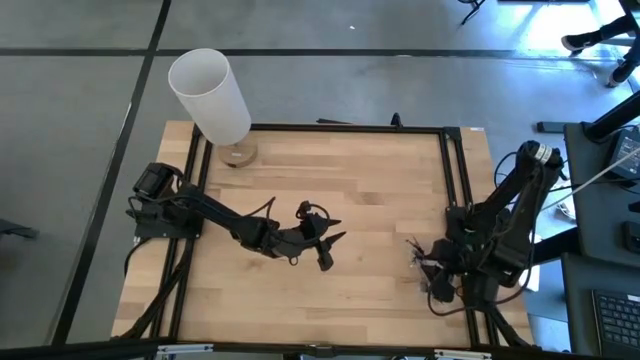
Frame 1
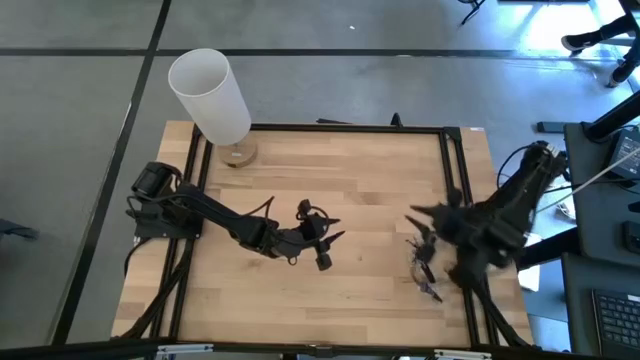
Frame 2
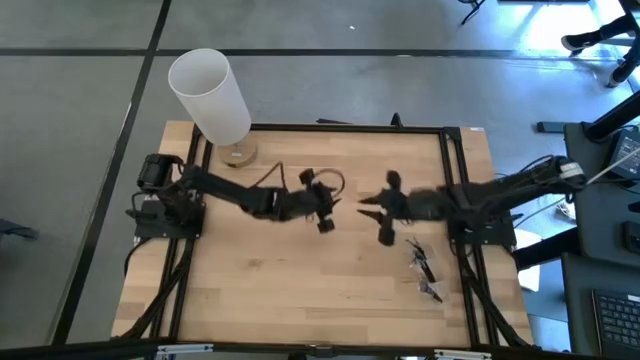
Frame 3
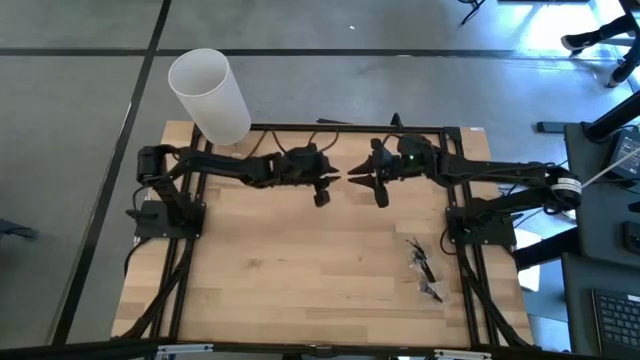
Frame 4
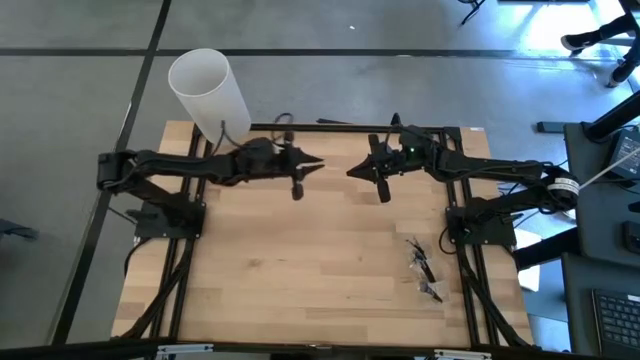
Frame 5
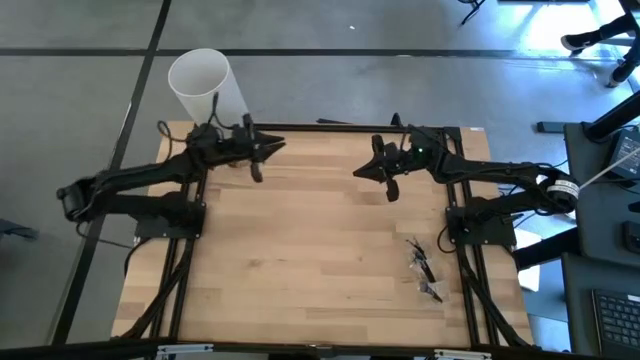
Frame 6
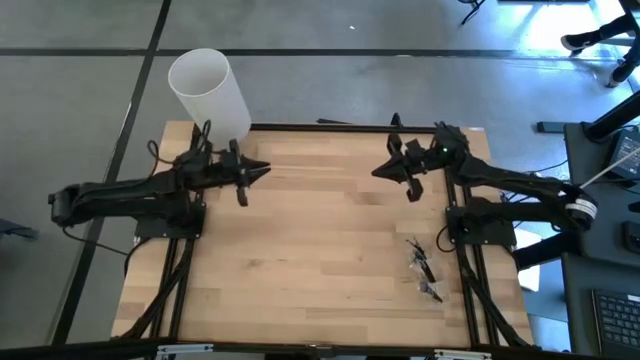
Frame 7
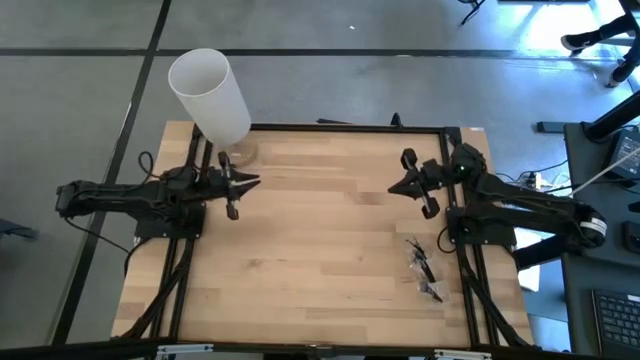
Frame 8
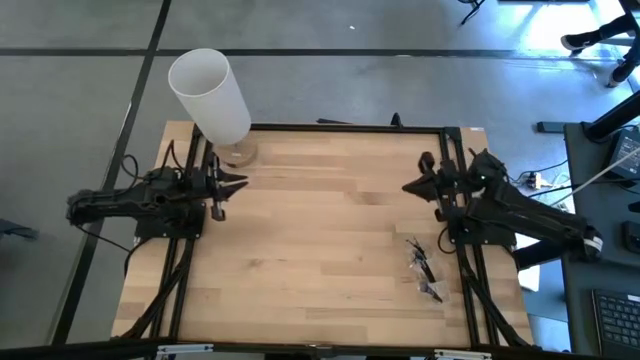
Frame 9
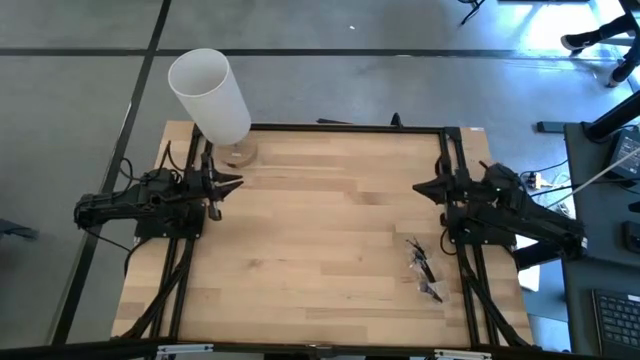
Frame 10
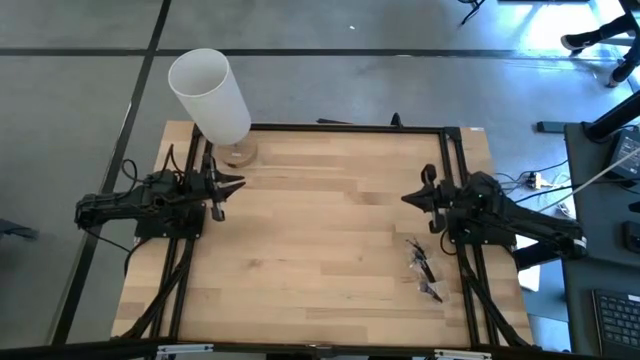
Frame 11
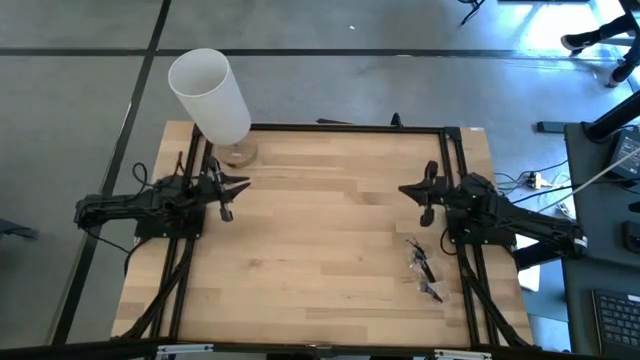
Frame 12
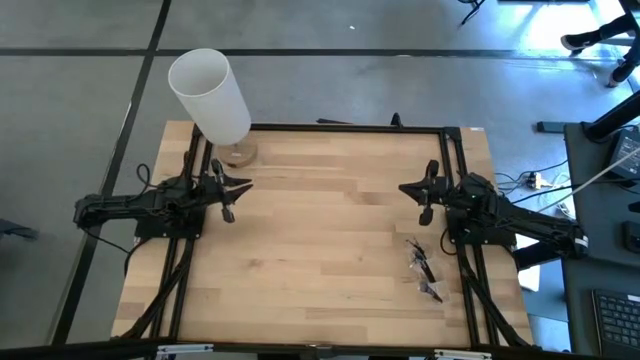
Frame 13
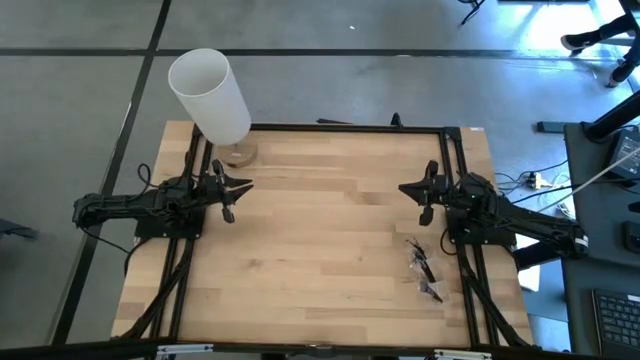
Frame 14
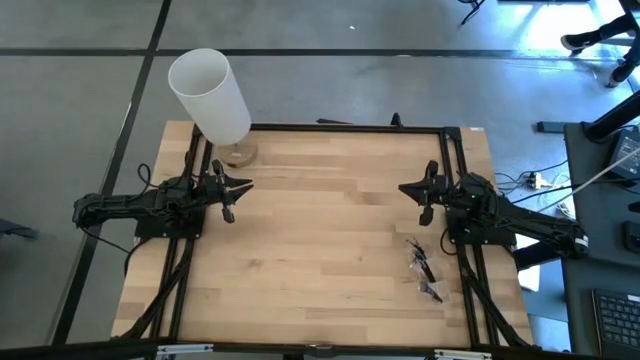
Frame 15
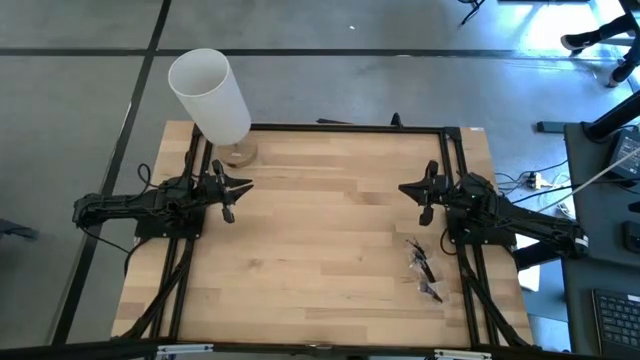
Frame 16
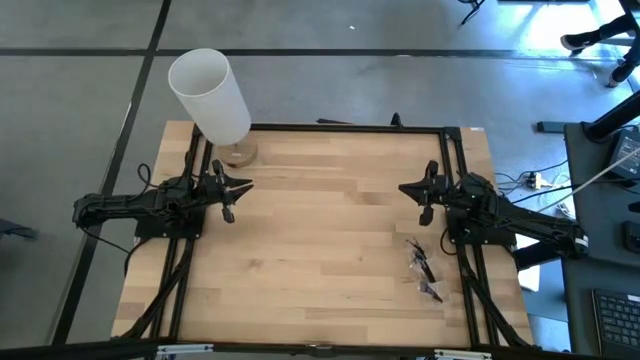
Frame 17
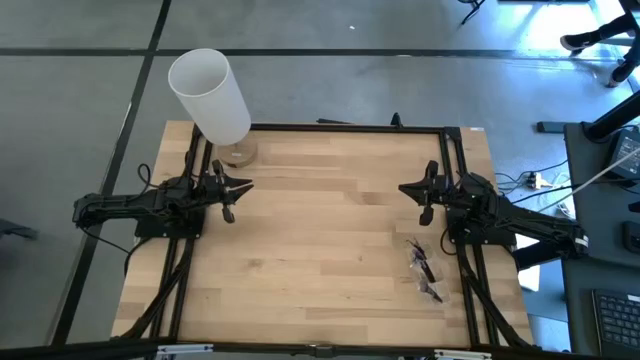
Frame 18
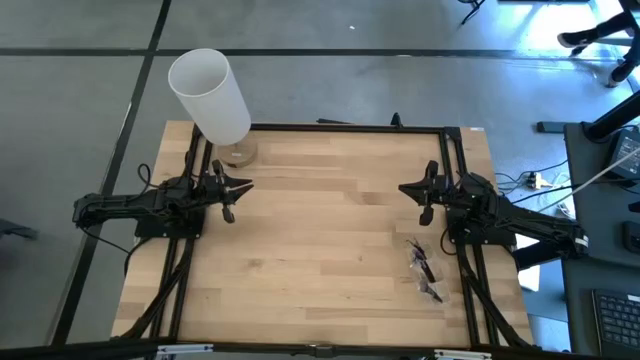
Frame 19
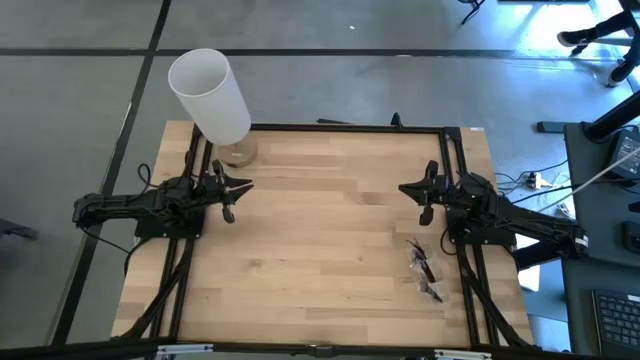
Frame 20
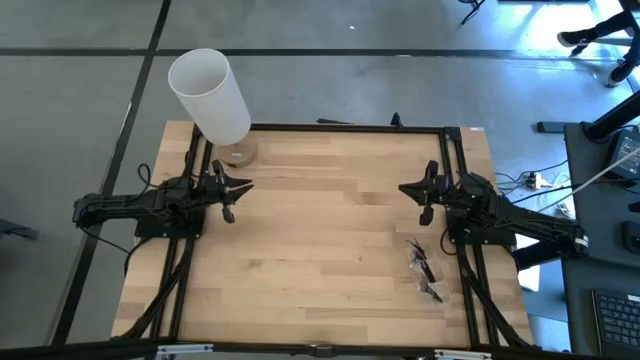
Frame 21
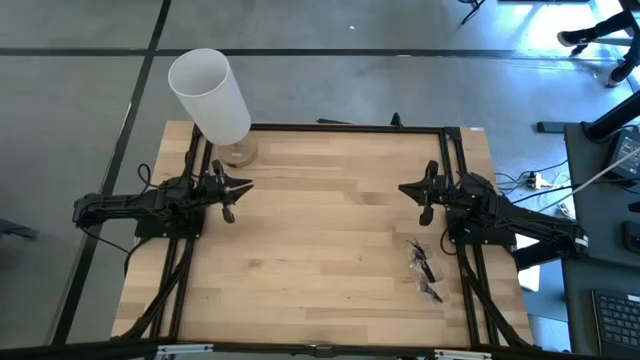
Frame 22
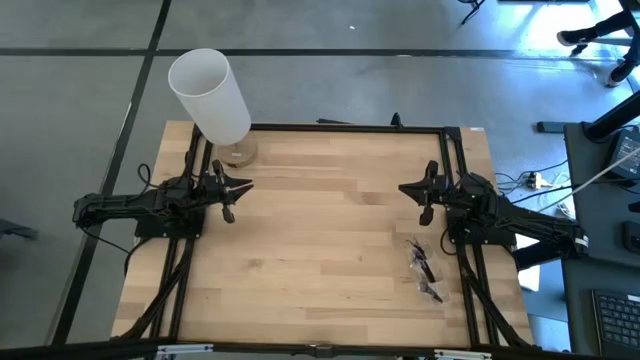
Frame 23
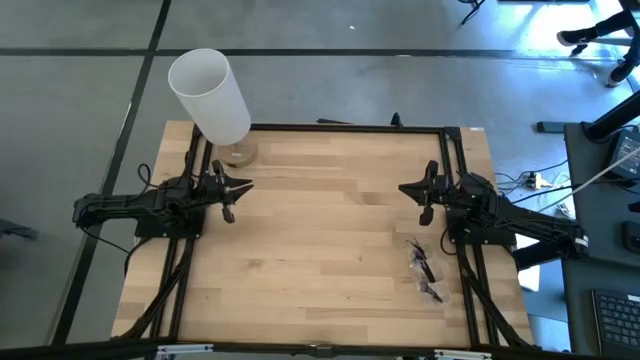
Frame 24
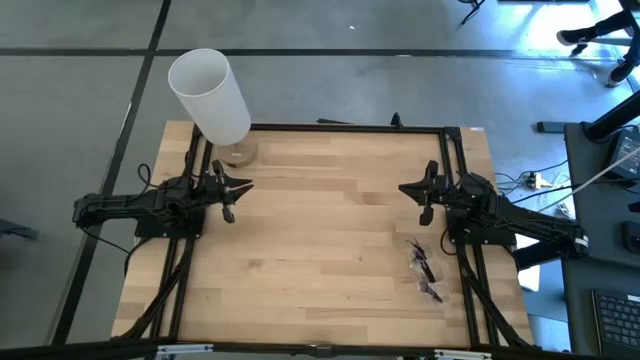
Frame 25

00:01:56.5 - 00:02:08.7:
Task: Put items in baskets/containers
Return to Home Position

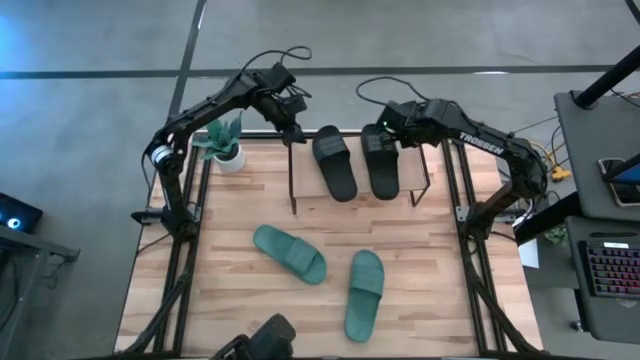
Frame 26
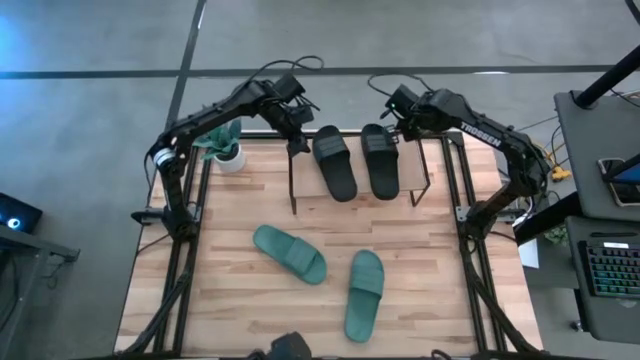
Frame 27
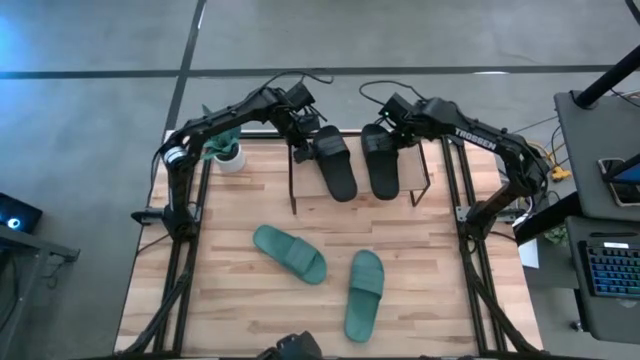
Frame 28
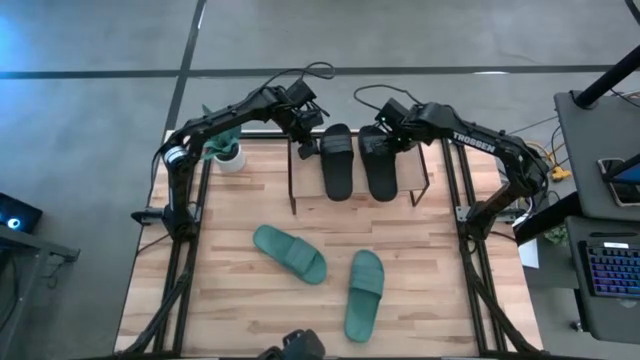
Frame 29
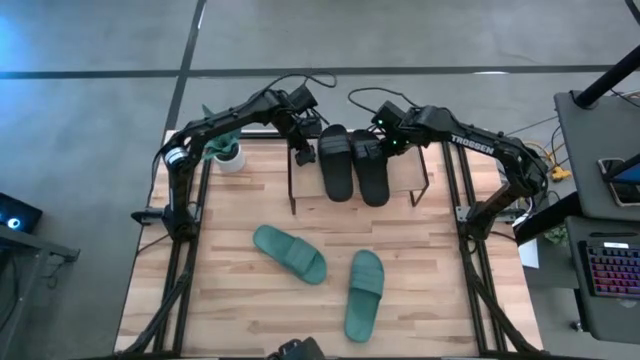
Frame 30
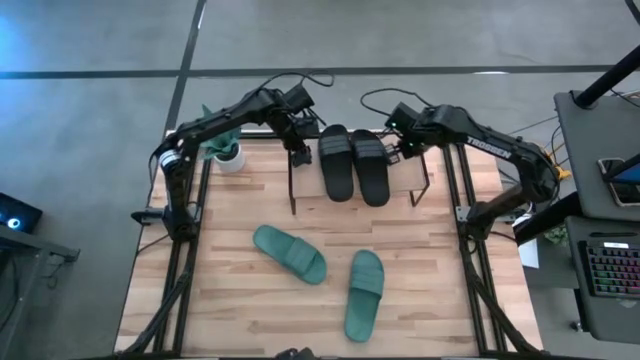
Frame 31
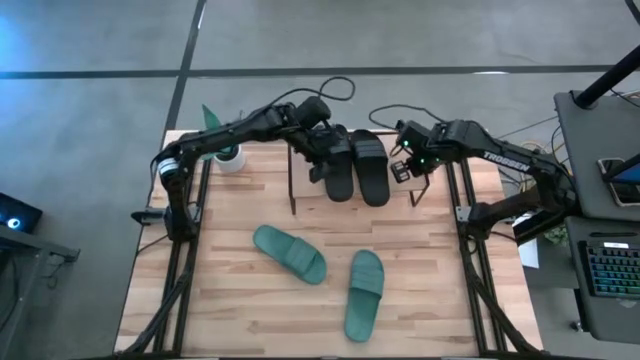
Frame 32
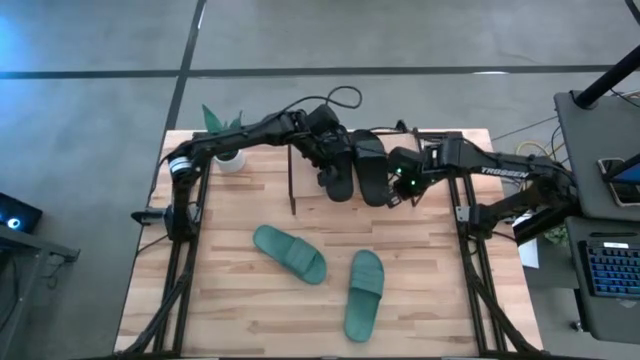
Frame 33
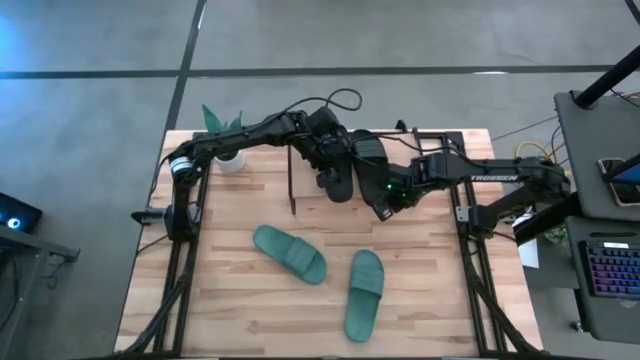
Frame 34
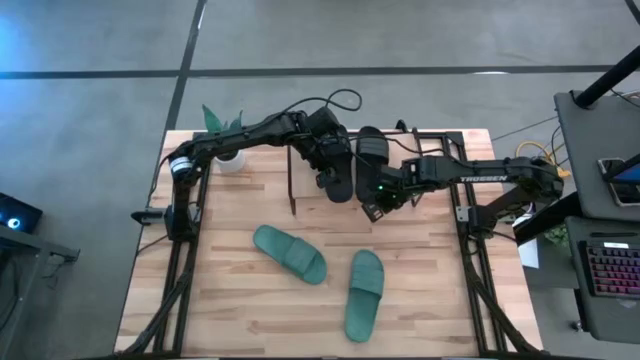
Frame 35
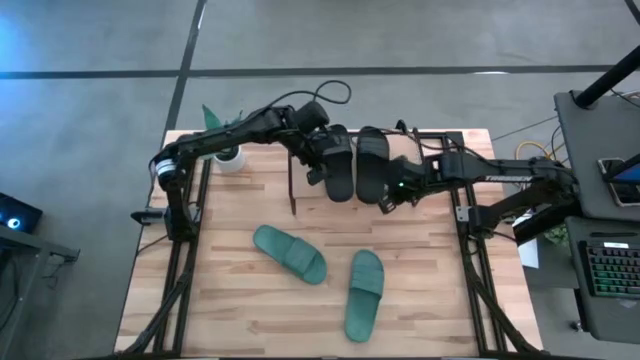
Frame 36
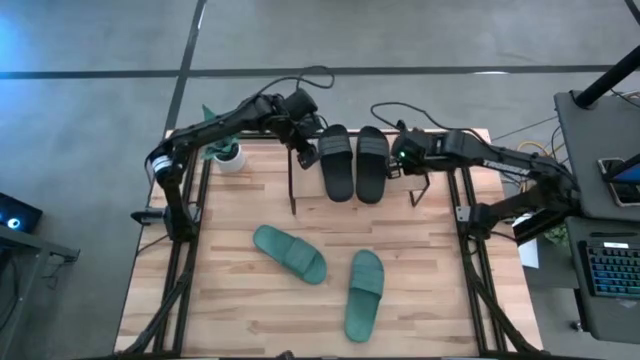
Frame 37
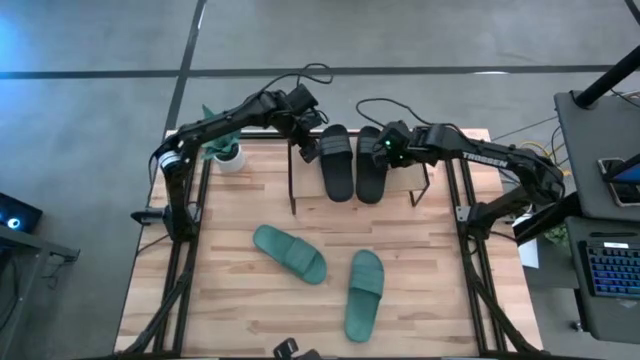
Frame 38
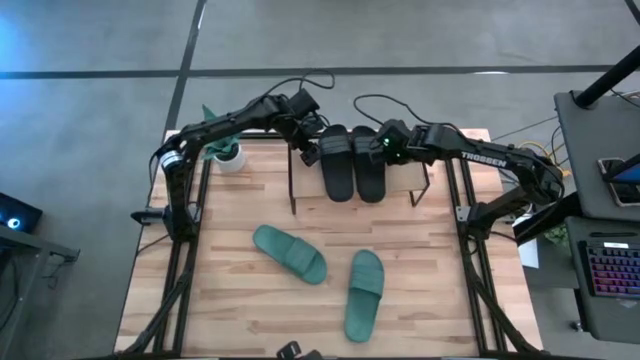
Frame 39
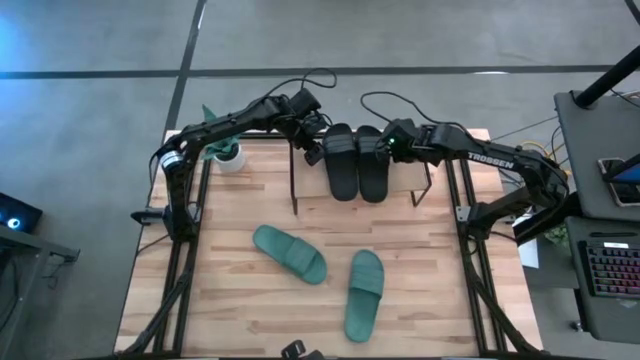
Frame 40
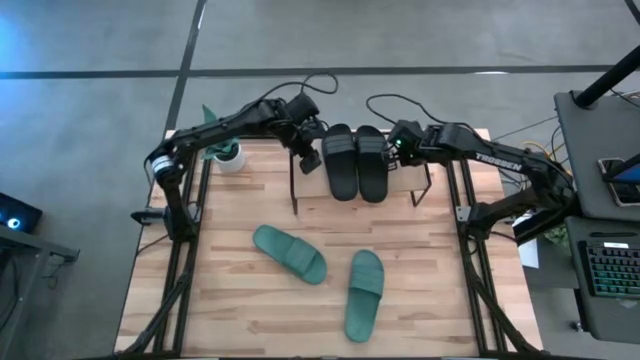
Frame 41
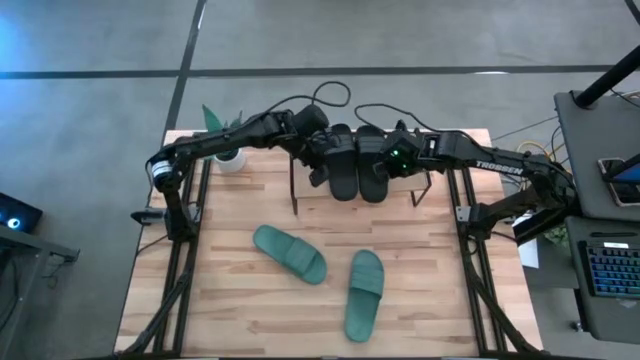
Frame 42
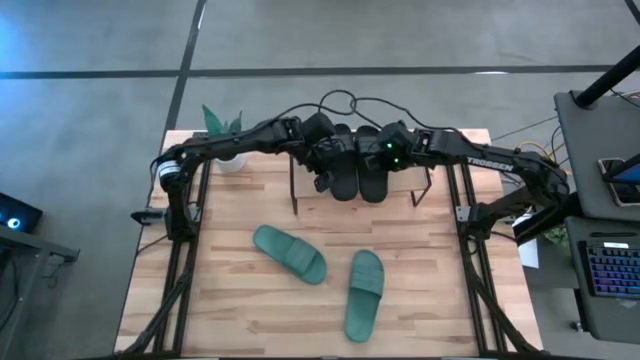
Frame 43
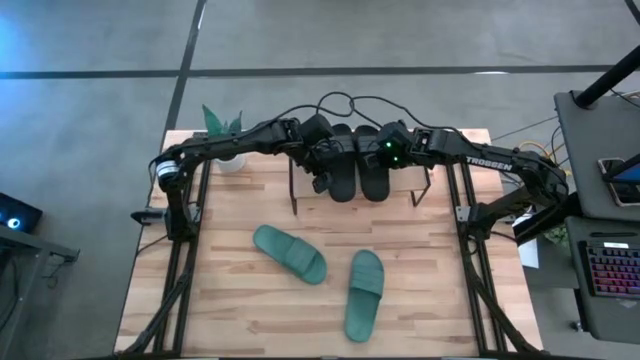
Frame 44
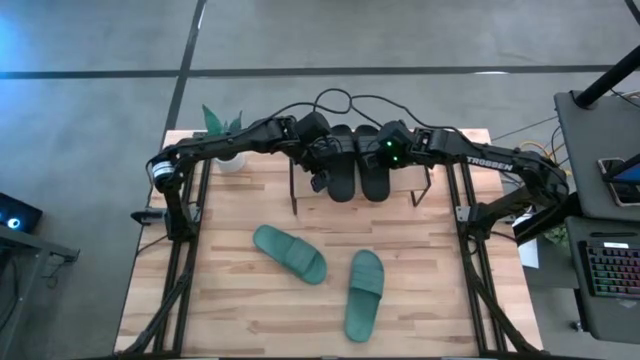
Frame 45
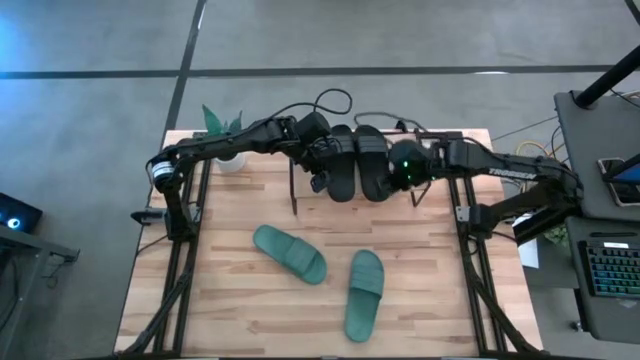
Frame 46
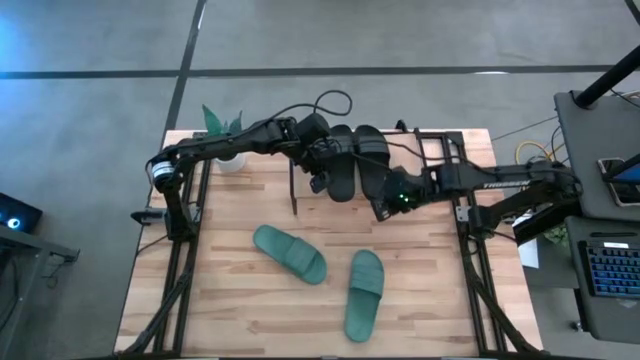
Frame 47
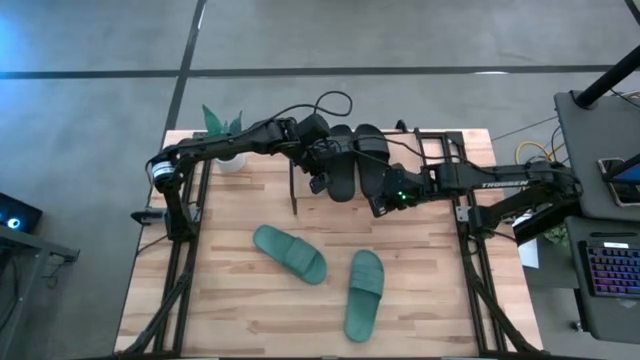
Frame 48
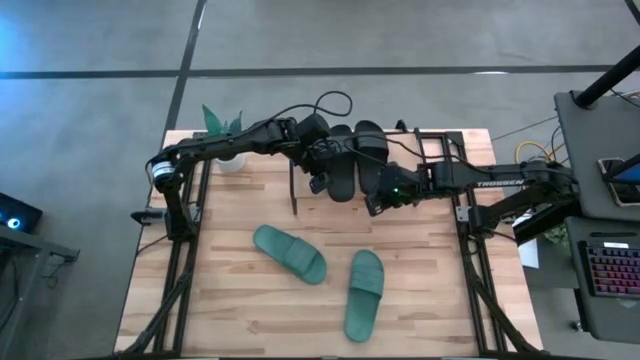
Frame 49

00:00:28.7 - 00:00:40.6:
Task: Pick and place slides into the shelf
Adjust the black slides on the shelf
